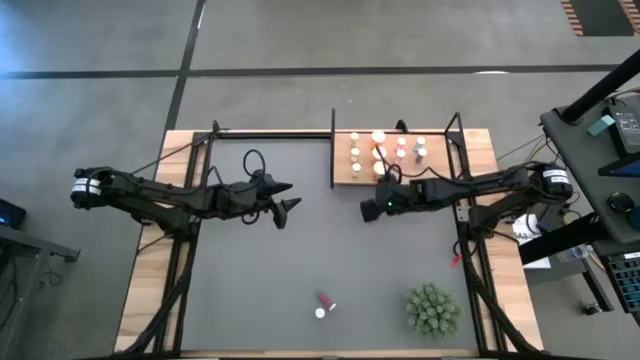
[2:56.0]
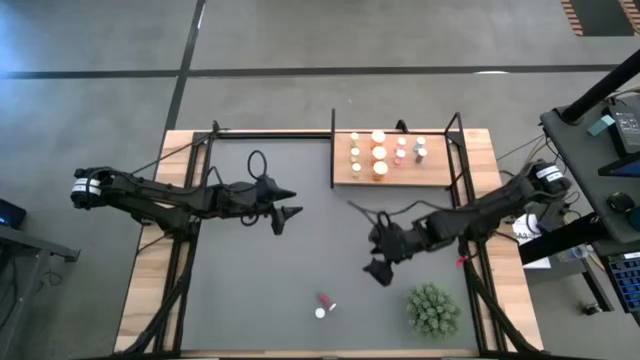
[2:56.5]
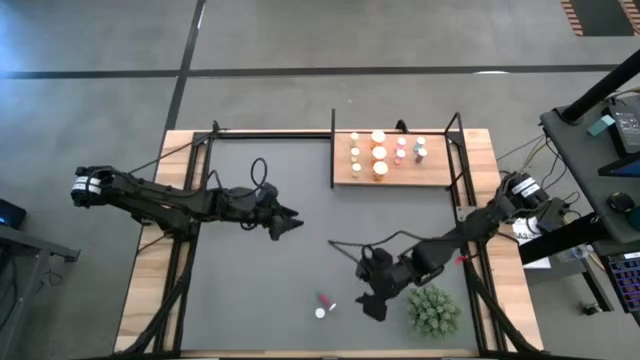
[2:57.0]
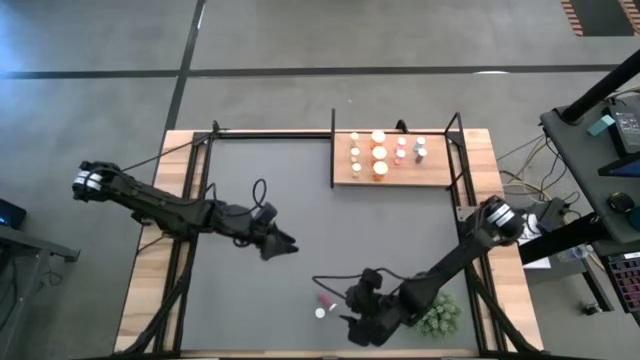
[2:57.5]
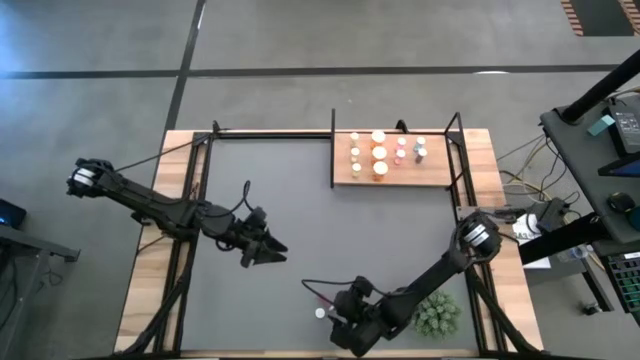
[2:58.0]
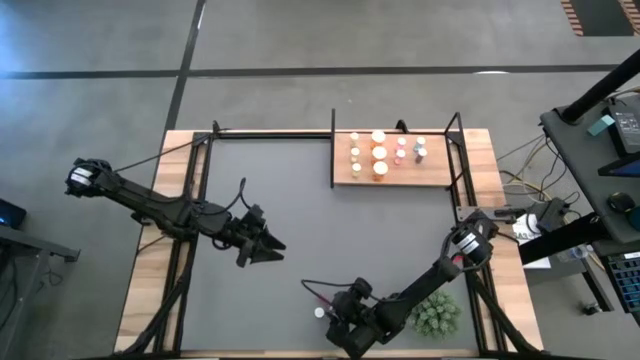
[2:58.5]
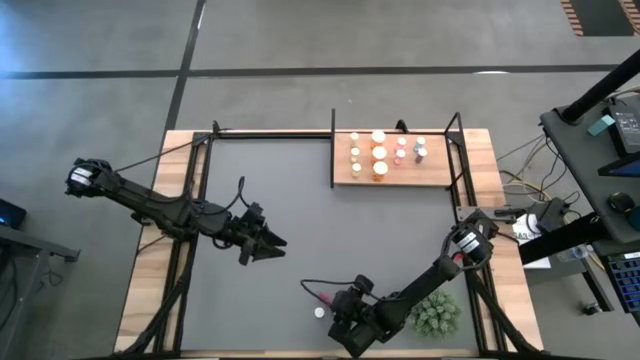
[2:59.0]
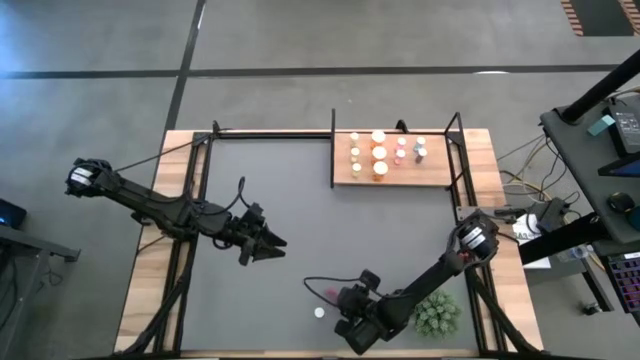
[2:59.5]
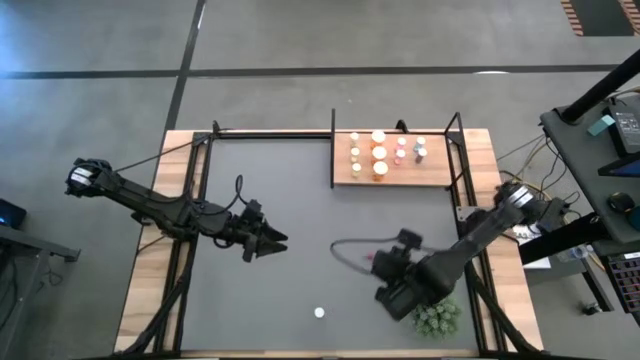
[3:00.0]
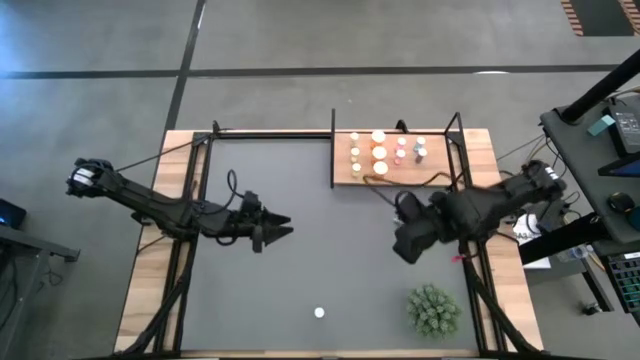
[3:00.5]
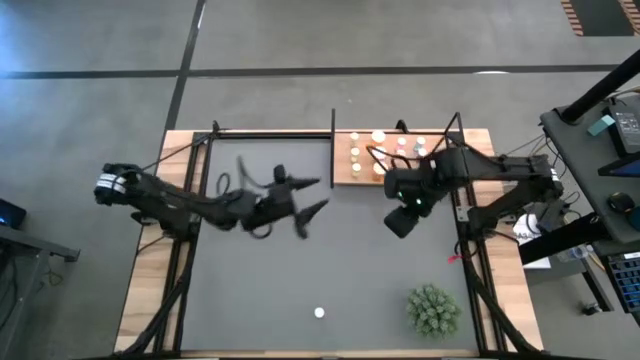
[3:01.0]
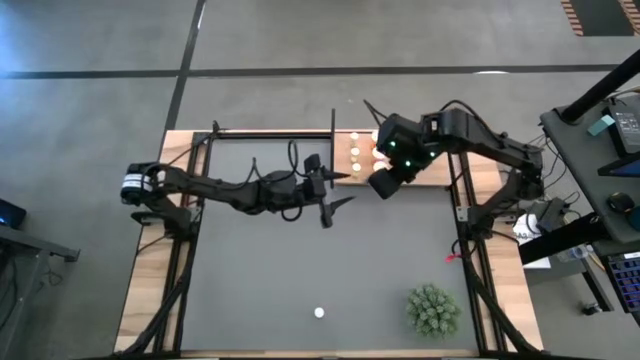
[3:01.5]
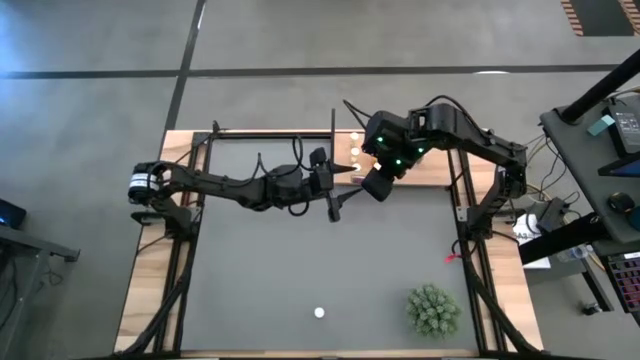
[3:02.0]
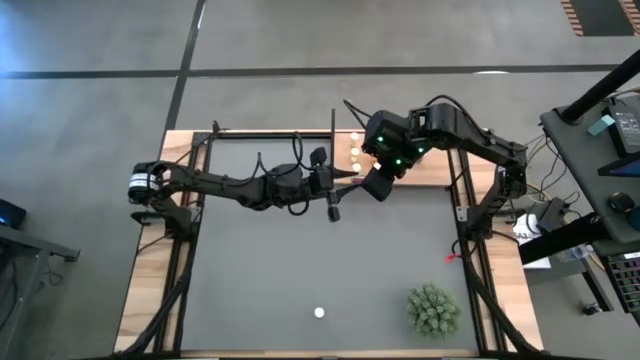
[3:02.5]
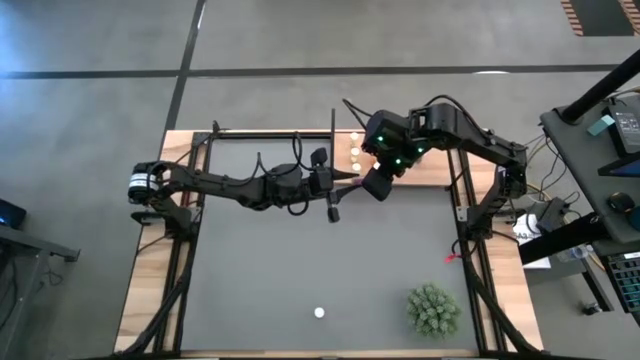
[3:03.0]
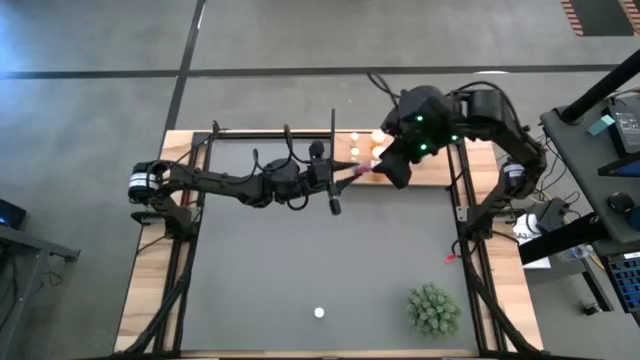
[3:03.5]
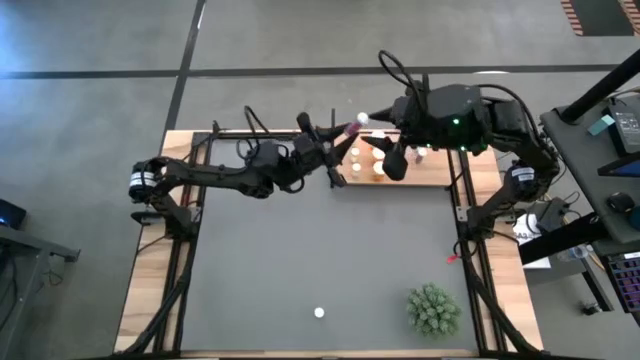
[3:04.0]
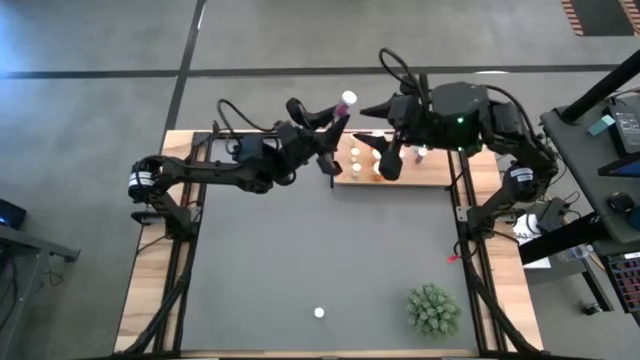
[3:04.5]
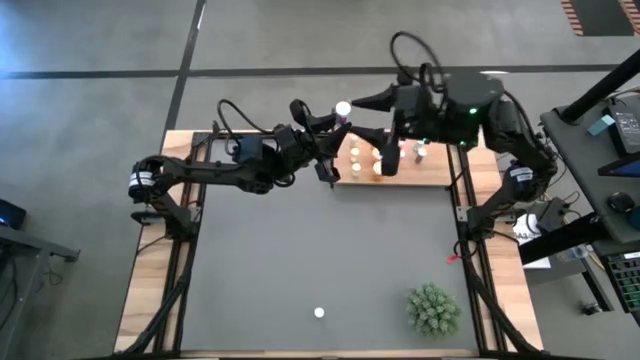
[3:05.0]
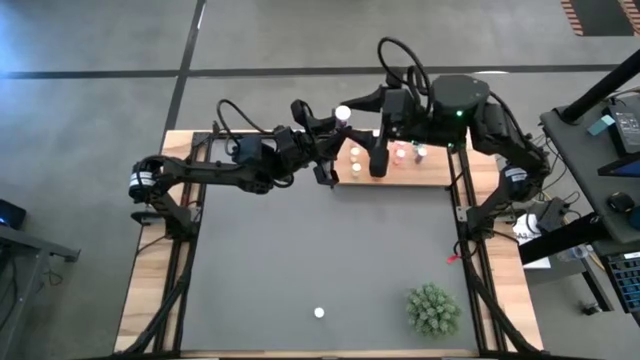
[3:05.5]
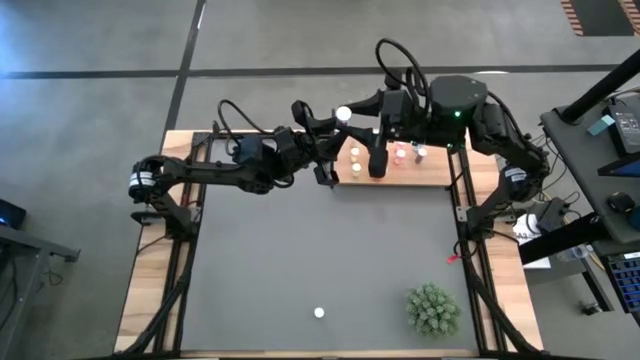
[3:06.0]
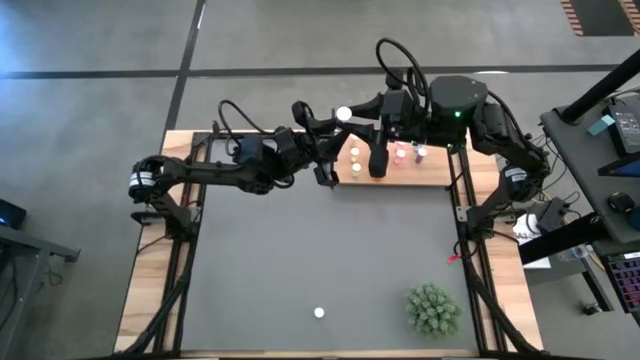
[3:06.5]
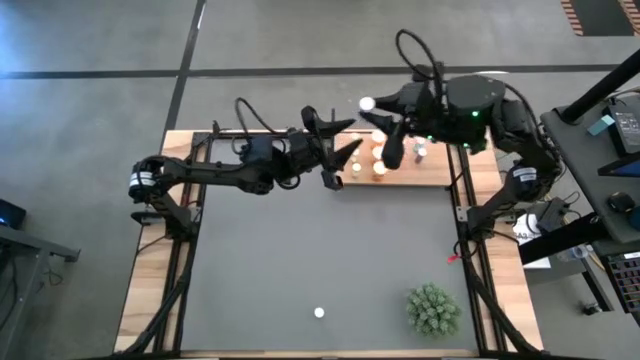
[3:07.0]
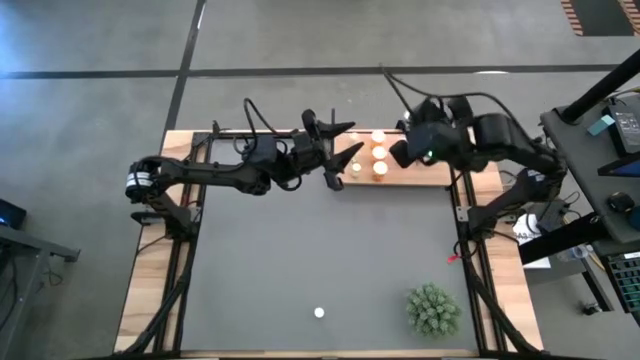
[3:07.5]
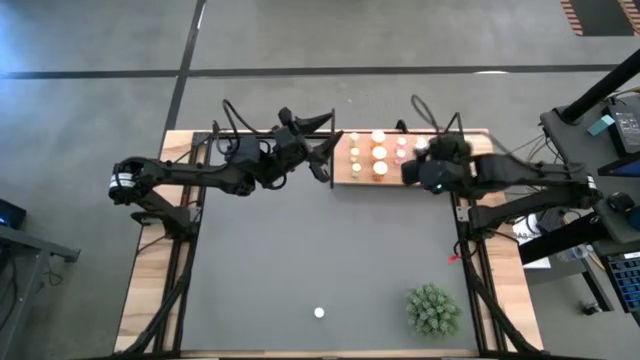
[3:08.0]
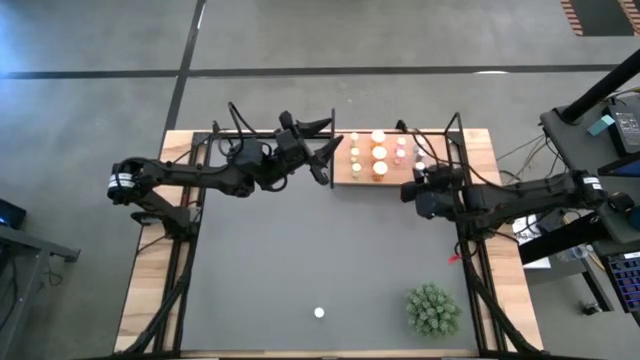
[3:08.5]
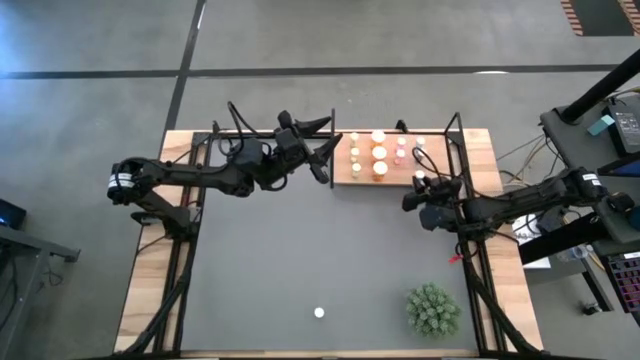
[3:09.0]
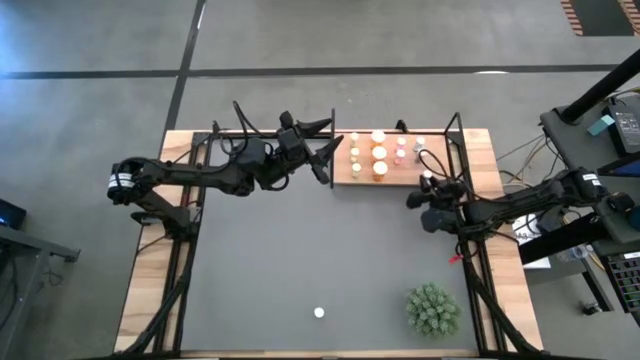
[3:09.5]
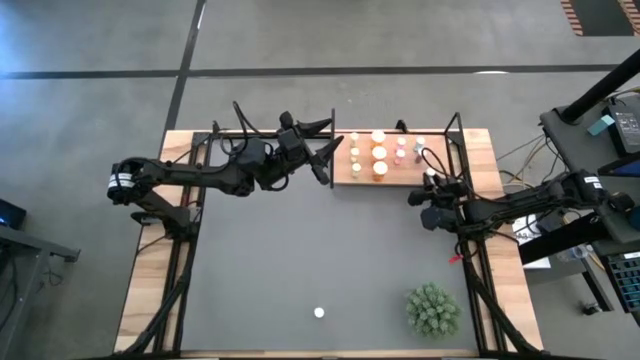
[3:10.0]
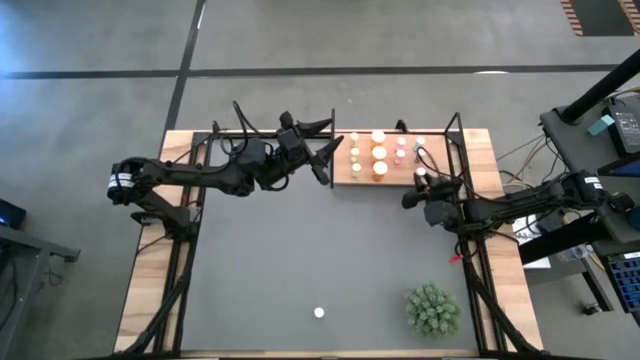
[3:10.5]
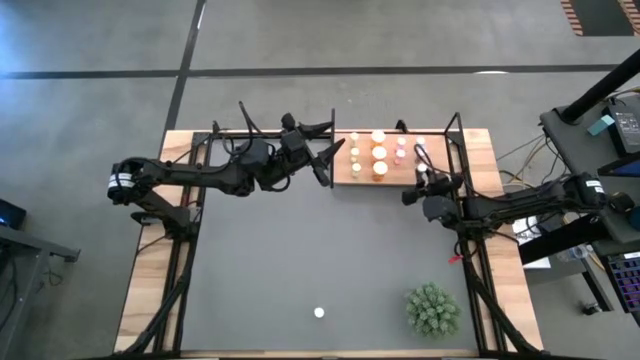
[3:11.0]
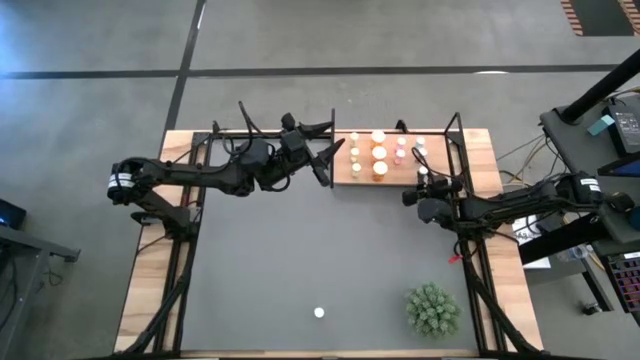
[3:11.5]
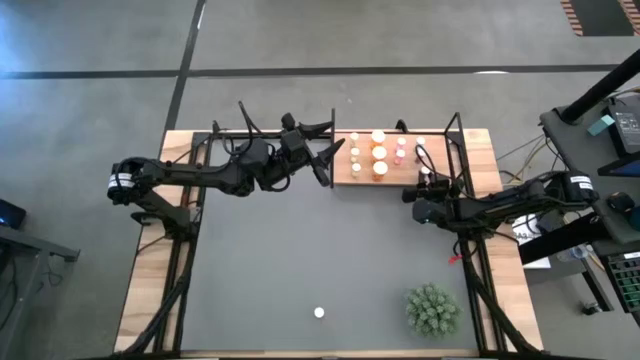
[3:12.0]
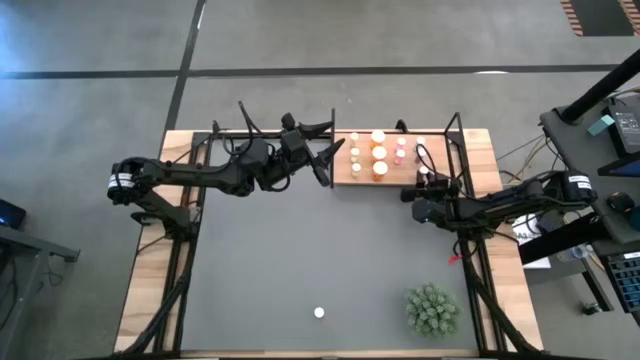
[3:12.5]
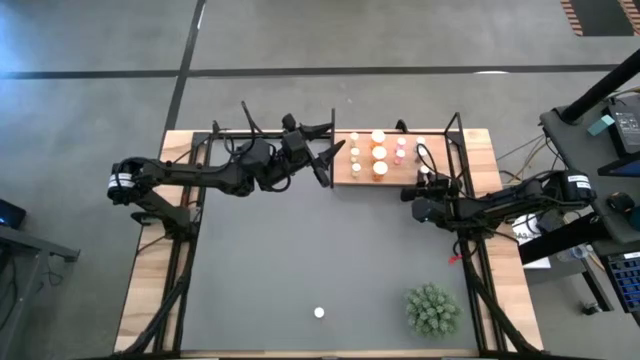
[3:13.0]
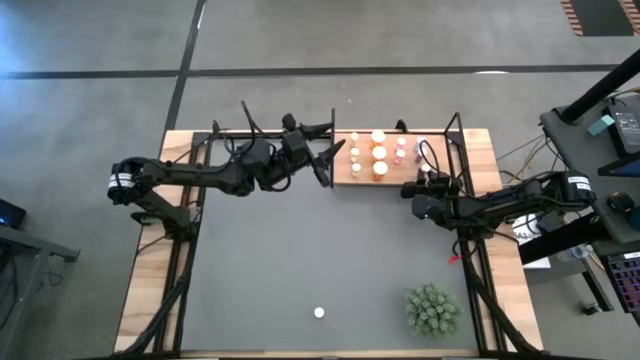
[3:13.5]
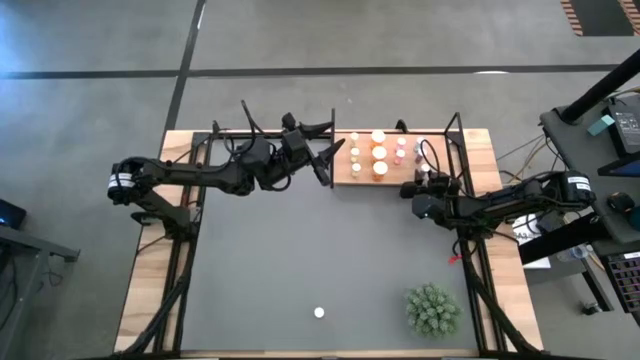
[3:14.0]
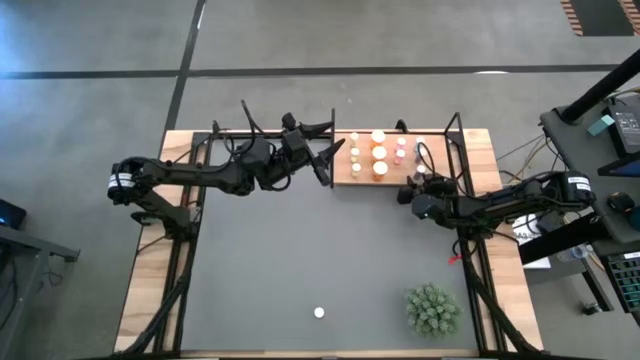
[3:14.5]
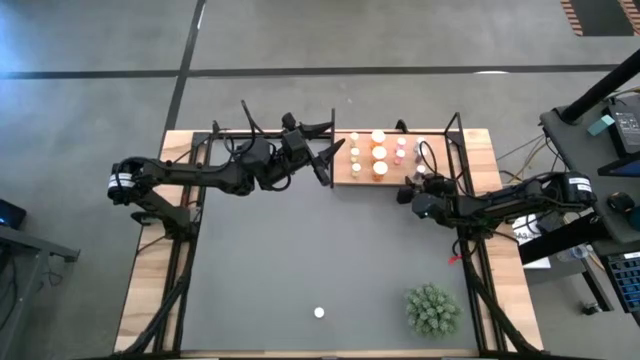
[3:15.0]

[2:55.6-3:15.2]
Task: Pick and place medicine bottles onto shelf by color
Put the blue medicine bottle on the shelf aligned with the other blue medicine bottle

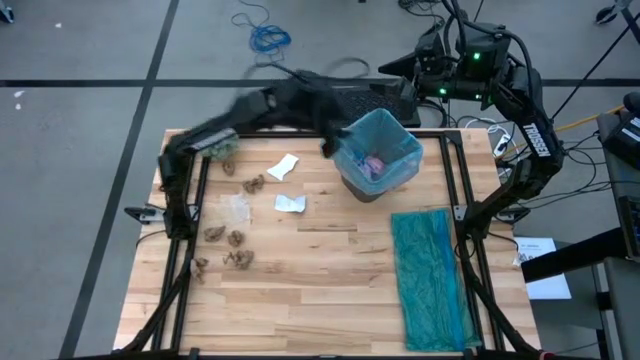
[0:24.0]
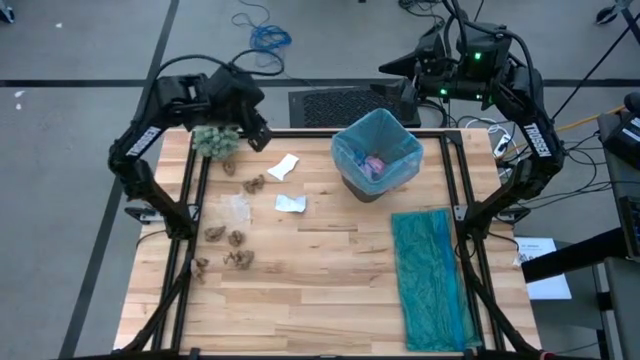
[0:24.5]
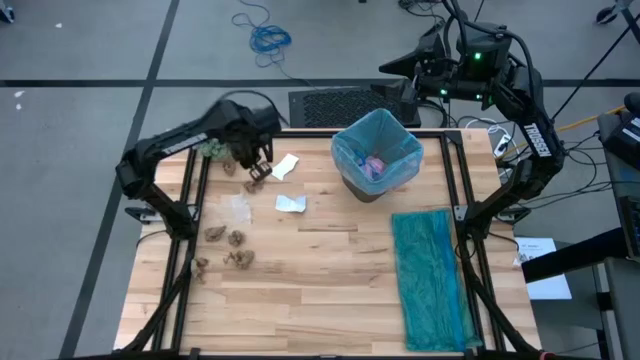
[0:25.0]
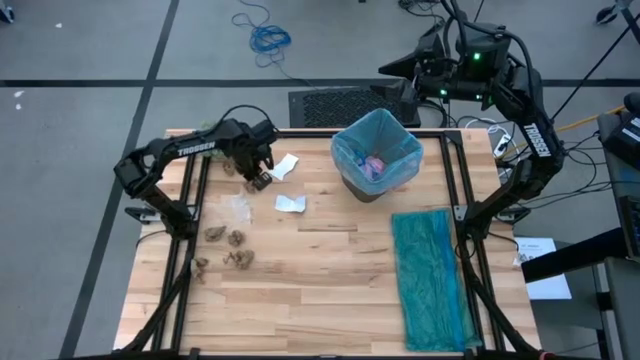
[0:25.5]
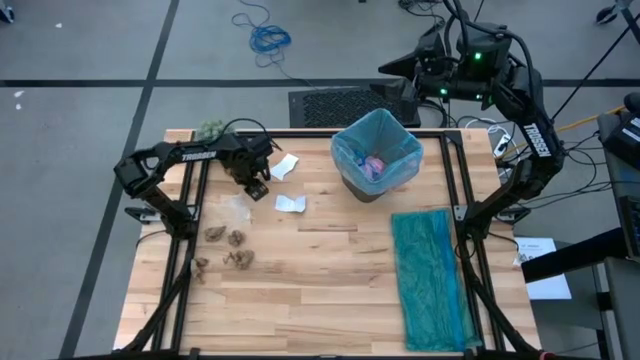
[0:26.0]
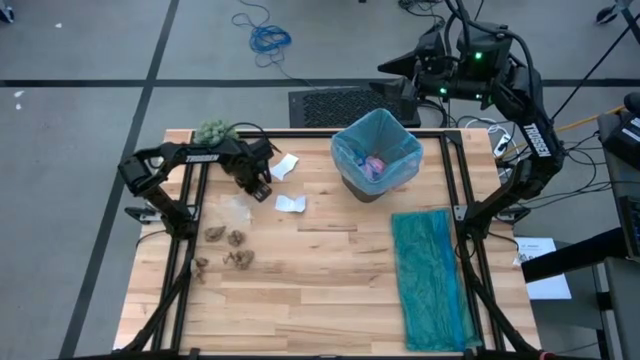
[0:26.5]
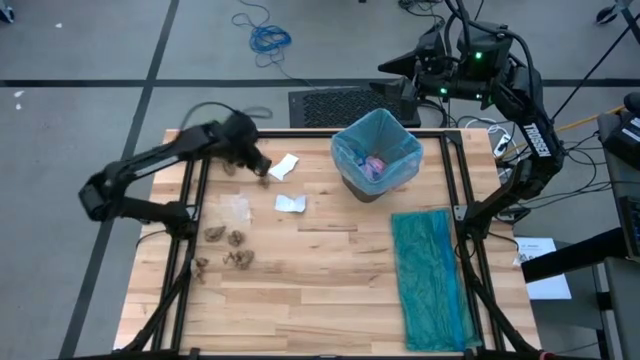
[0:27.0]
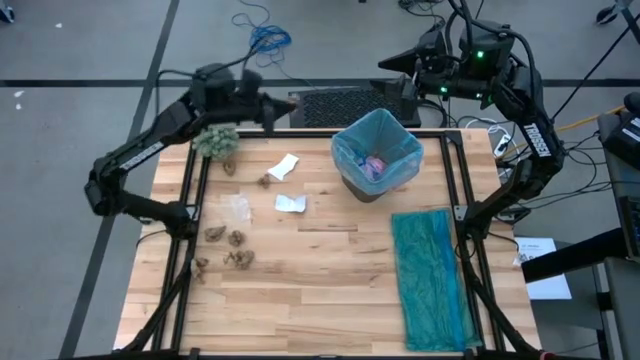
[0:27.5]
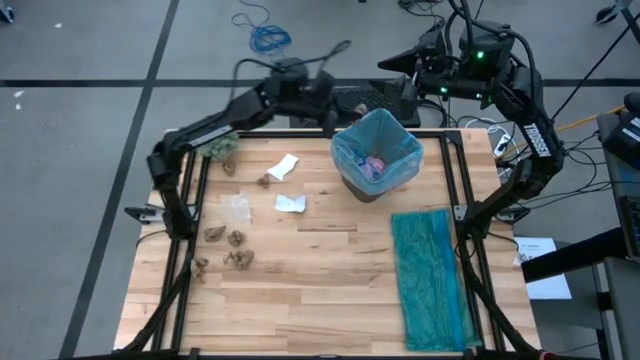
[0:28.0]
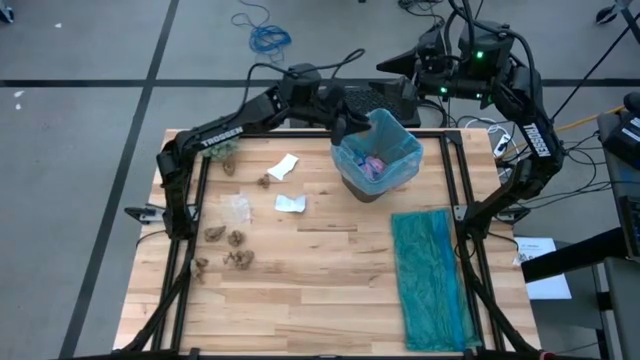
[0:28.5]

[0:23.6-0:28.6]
Task: place trash/remove bag and relplace
Put the brown paper into the trash bin
